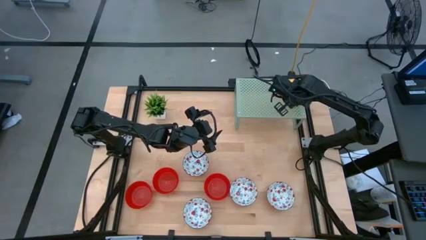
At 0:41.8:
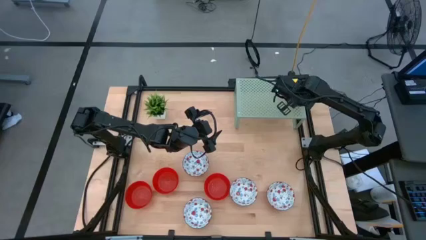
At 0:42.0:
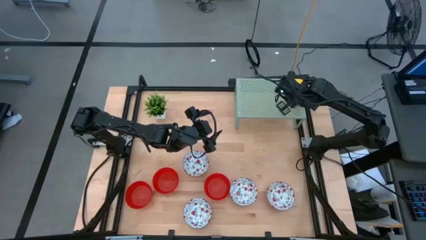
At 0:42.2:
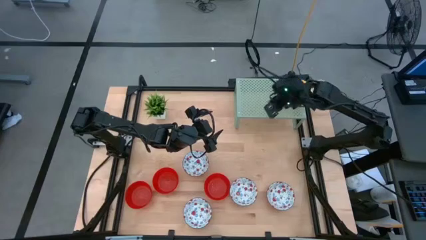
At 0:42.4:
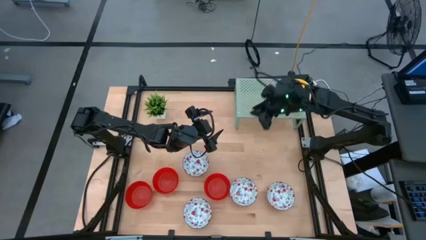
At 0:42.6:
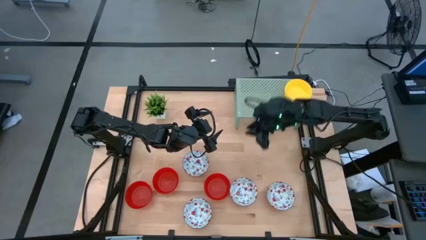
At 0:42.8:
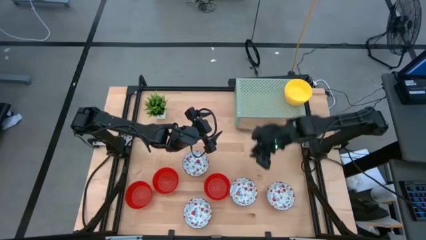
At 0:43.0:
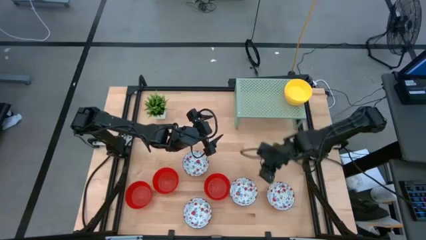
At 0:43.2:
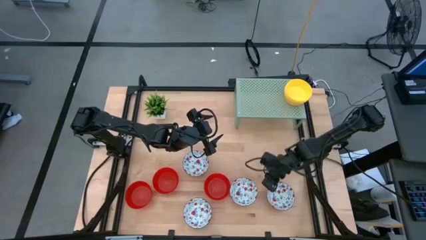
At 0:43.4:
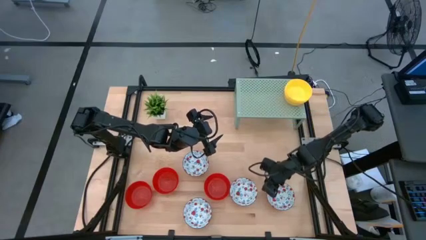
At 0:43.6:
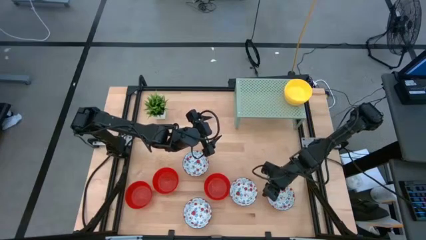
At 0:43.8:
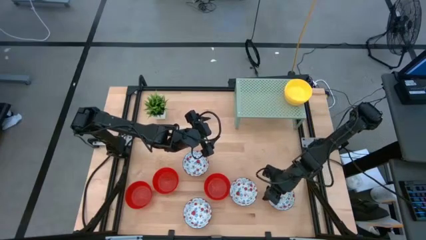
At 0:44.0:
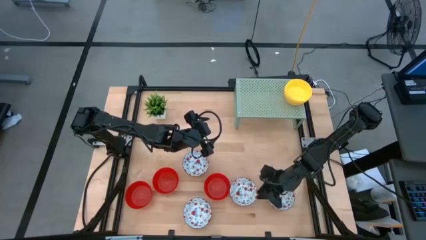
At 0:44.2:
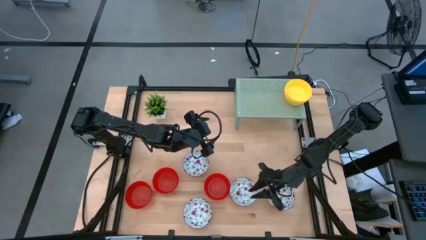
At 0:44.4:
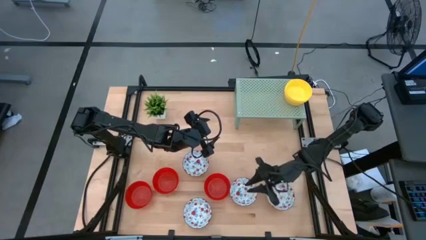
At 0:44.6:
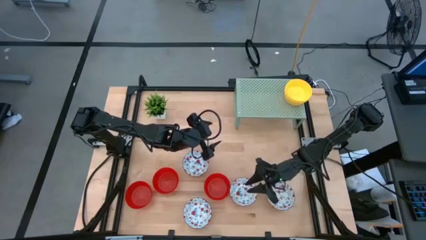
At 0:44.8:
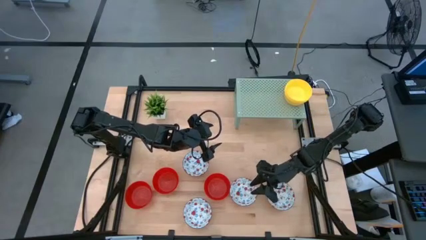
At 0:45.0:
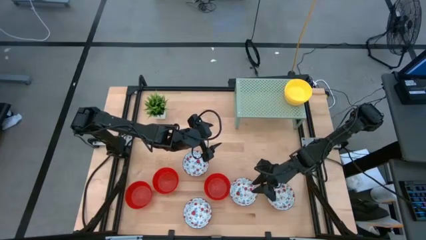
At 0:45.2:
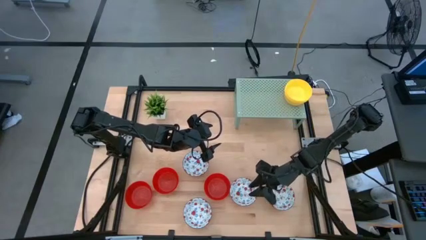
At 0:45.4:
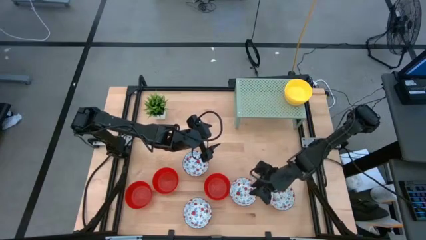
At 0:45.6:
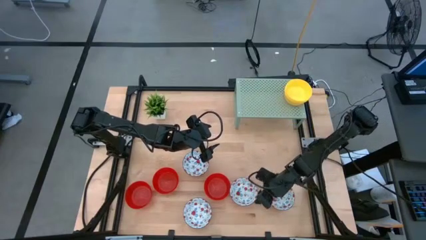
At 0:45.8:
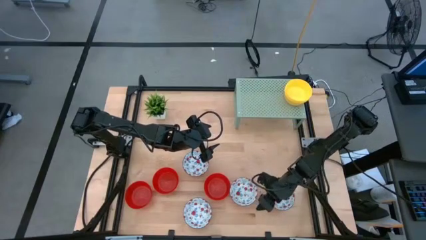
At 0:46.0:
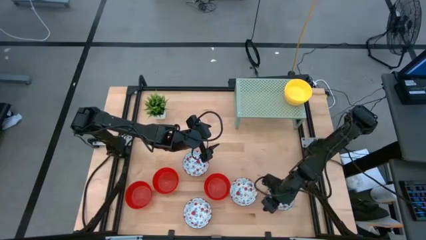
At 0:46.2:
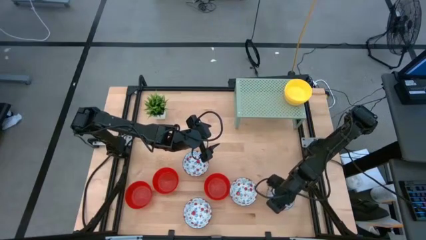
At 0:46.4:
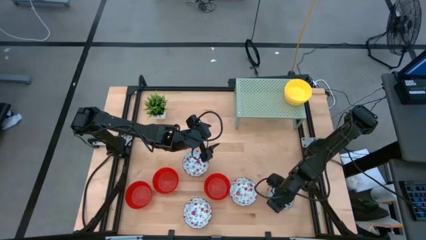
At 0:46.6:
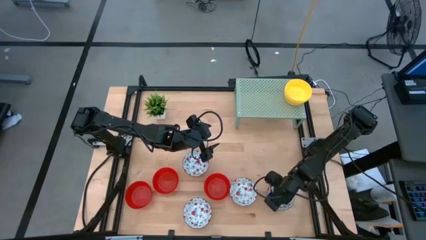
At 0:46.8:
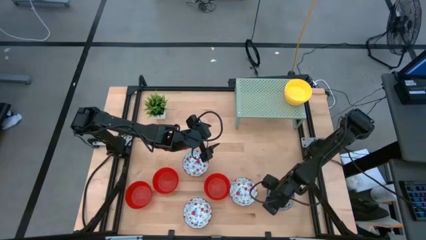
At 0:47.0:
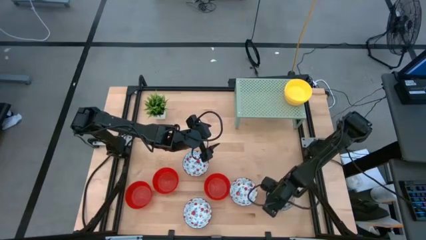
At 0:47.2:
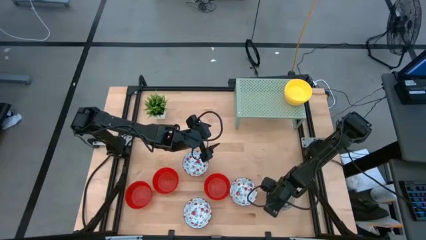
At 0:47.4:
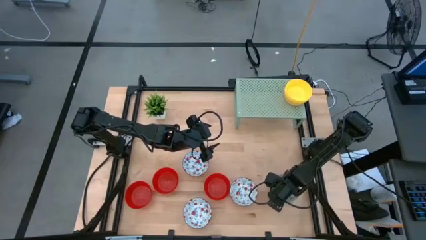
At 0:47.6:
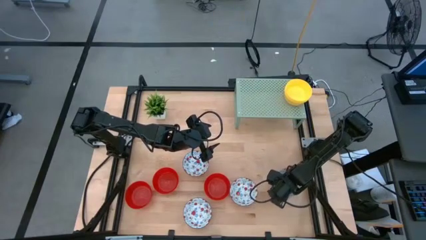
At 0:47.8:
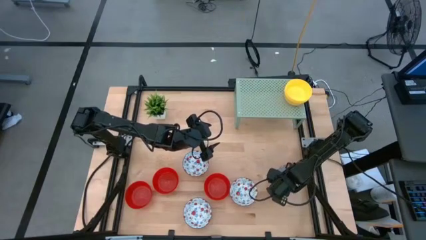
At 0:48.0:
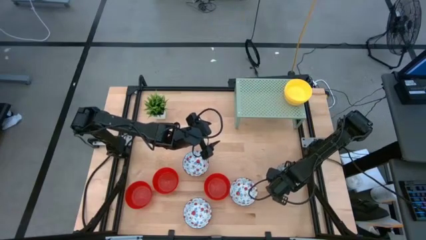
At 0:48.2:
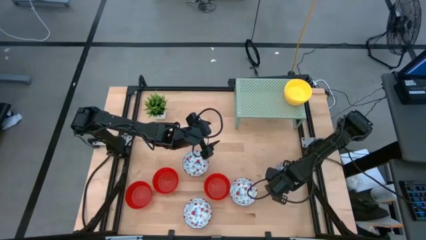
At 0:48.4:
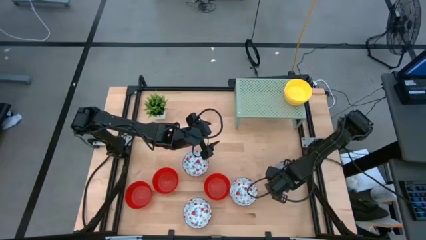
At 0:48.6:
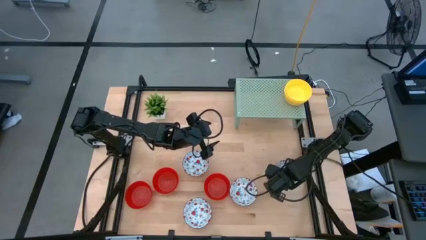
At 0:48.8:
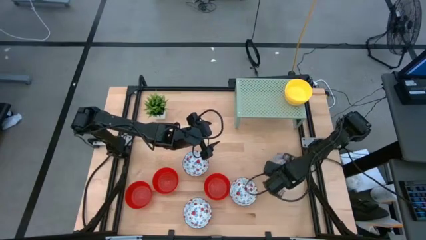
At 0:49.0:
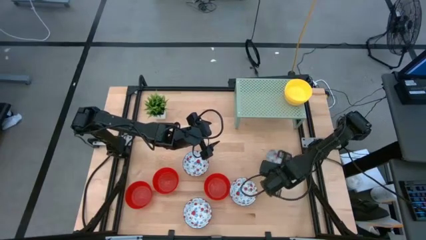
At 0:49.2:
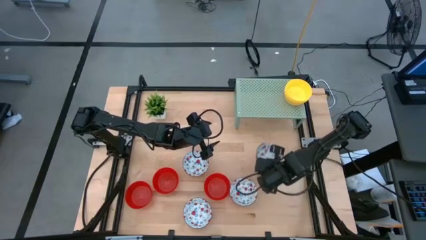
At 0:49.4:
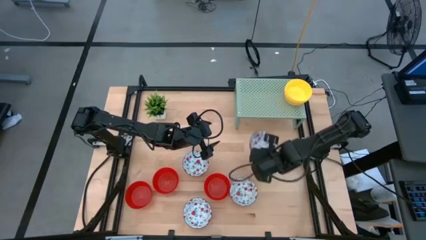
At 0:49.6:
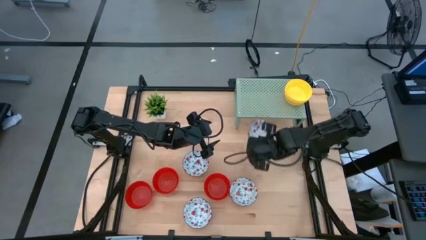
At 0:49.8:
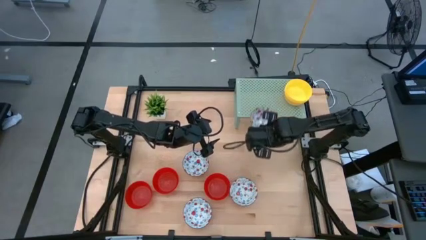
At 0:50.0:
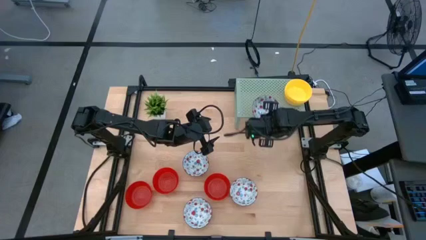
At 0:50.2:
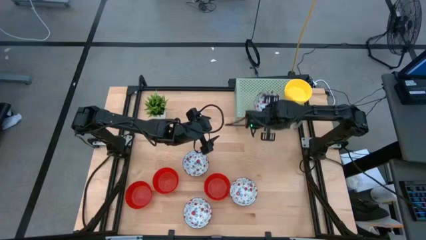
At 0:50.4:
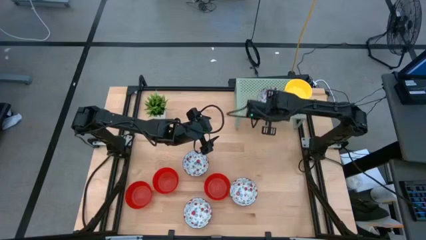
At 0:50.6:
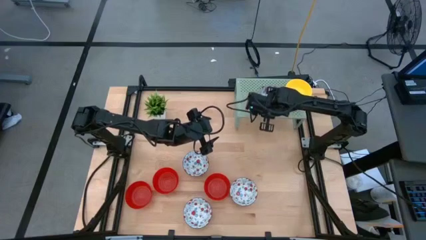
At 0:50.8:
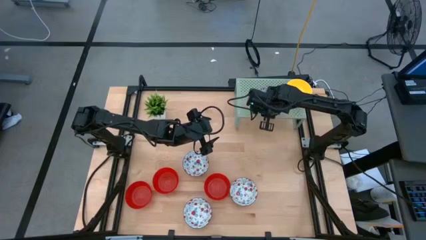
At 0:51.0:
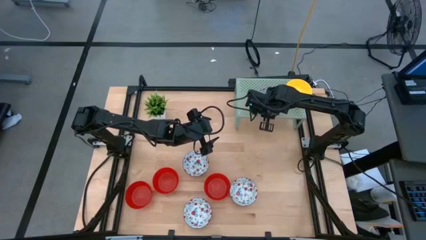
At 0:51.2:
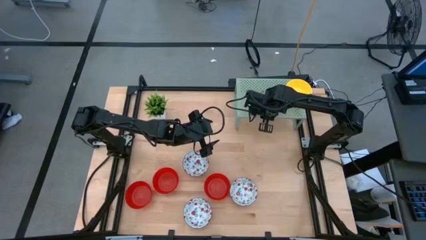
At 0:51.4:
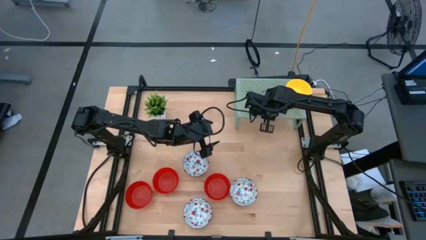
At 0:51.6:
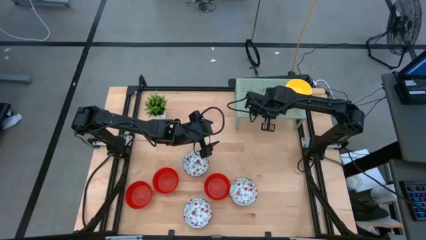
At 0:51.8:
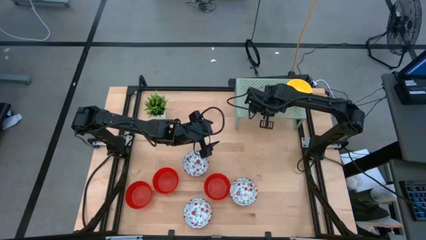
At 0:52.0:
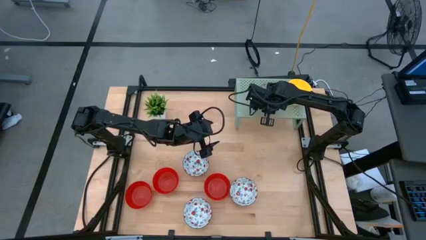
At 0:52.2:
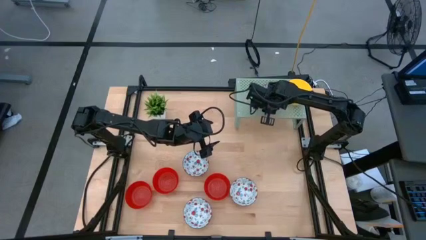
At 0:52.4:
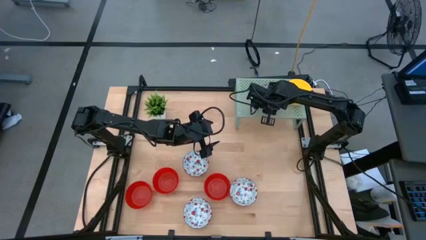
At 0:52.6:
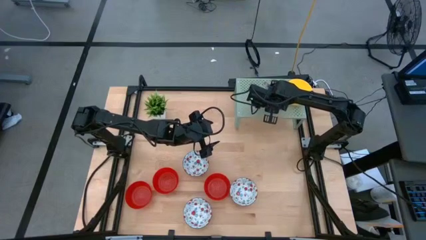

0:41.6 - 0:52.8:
Task: Pick & Place Mini bowls
Put the white pattern bowl on the shelf

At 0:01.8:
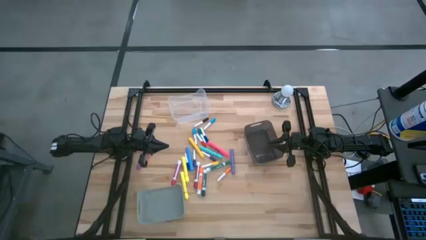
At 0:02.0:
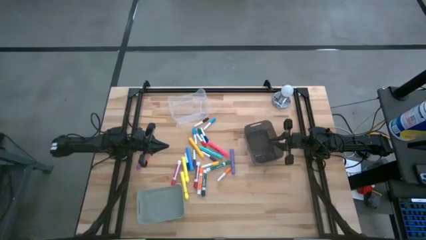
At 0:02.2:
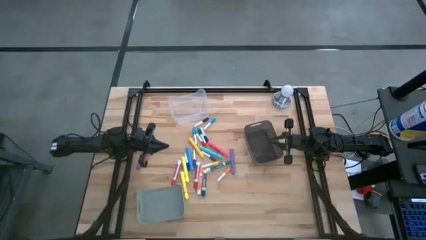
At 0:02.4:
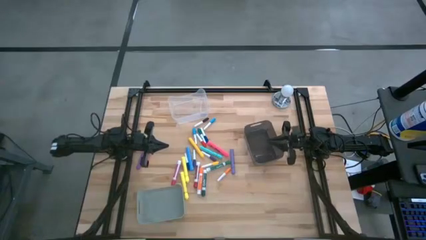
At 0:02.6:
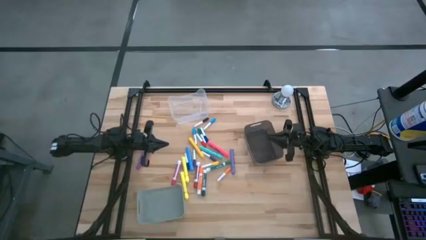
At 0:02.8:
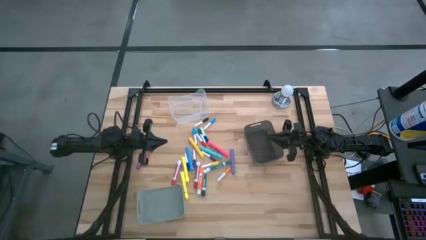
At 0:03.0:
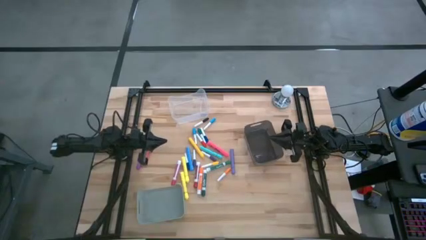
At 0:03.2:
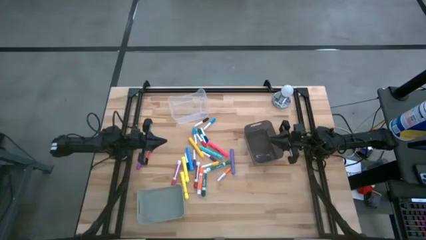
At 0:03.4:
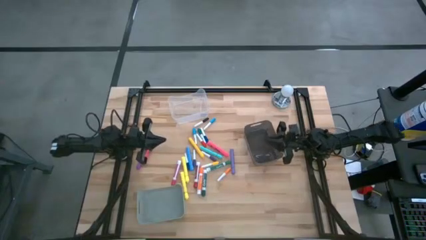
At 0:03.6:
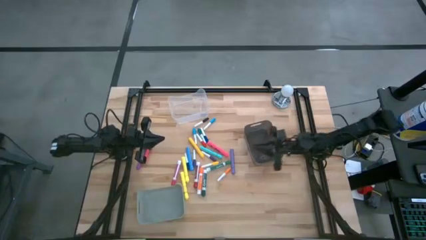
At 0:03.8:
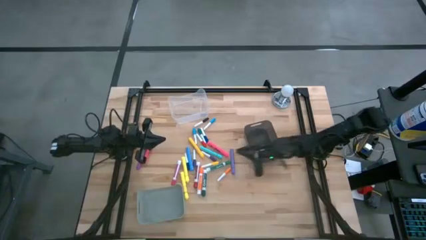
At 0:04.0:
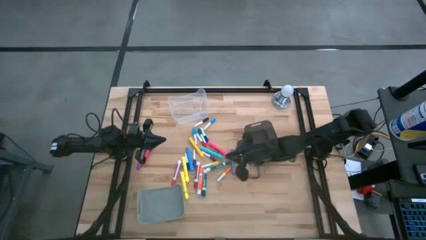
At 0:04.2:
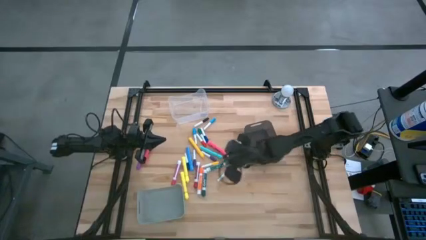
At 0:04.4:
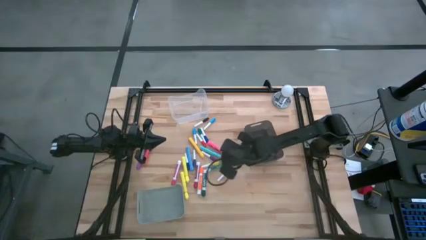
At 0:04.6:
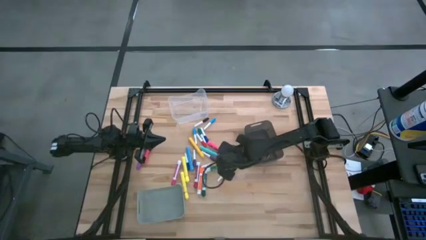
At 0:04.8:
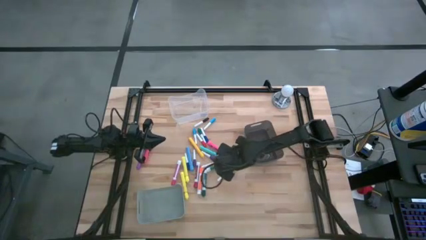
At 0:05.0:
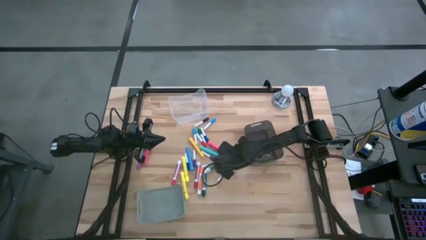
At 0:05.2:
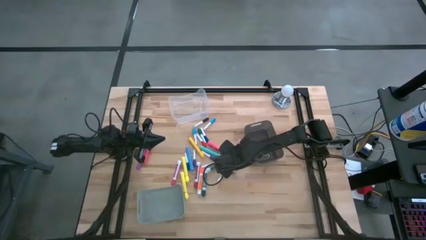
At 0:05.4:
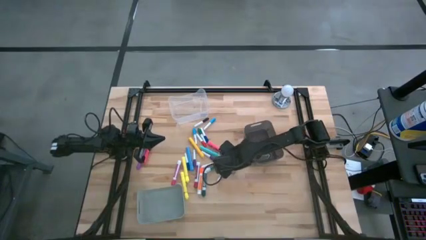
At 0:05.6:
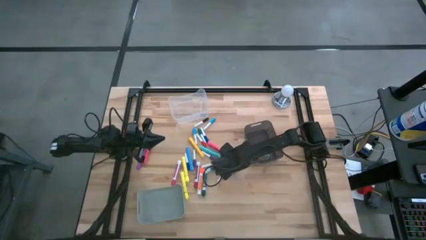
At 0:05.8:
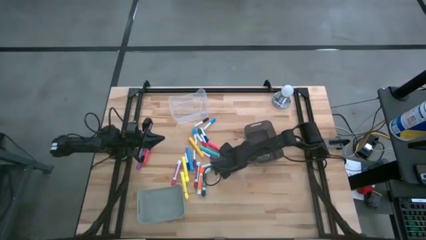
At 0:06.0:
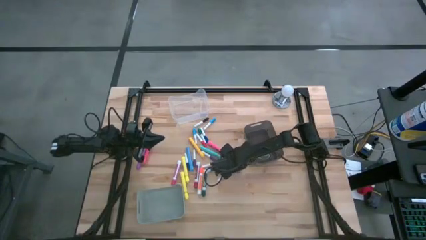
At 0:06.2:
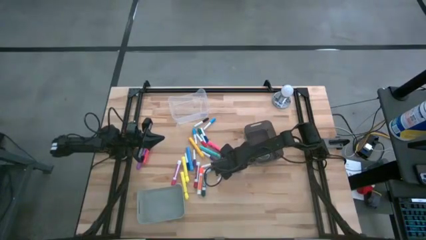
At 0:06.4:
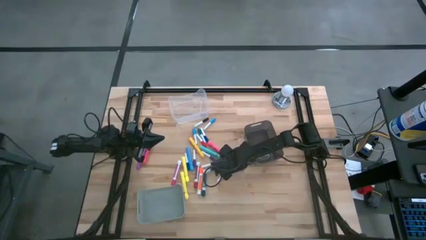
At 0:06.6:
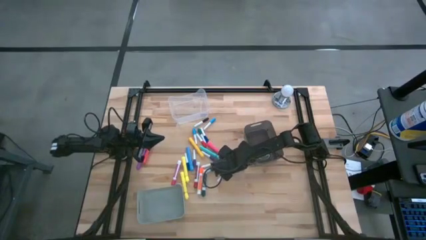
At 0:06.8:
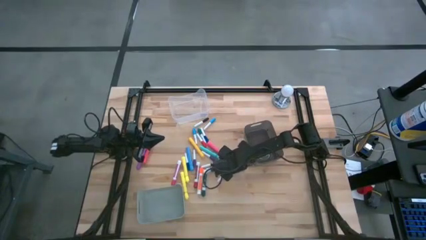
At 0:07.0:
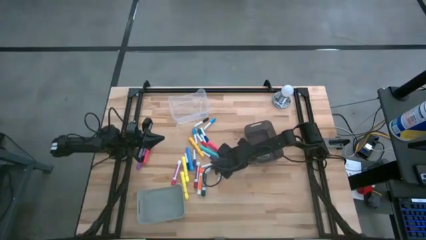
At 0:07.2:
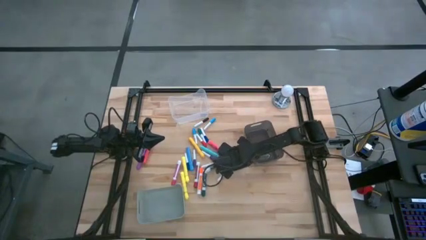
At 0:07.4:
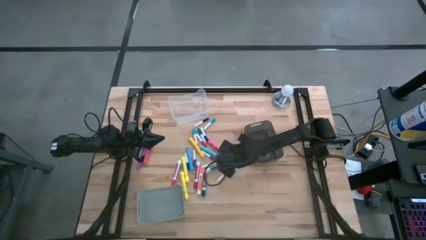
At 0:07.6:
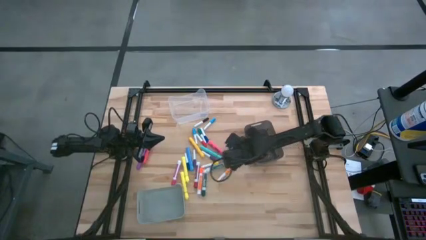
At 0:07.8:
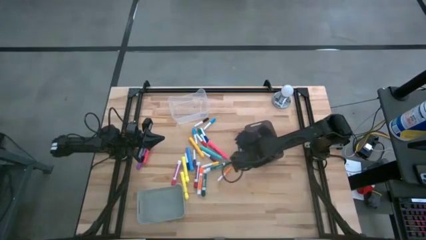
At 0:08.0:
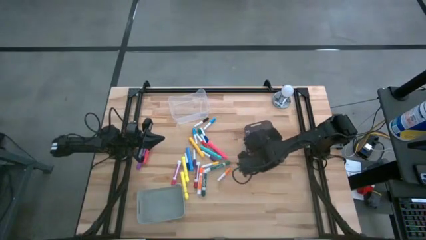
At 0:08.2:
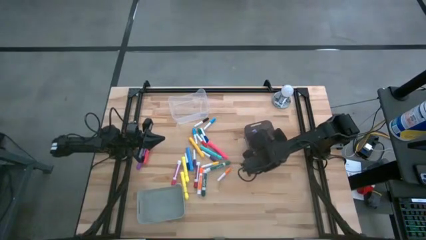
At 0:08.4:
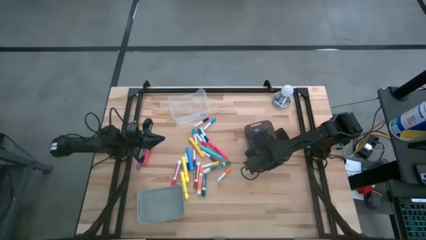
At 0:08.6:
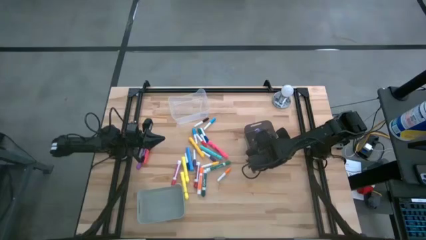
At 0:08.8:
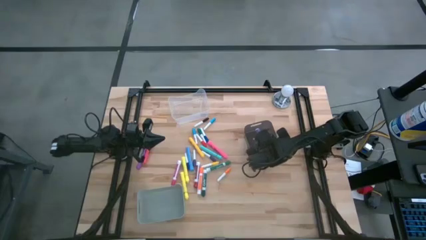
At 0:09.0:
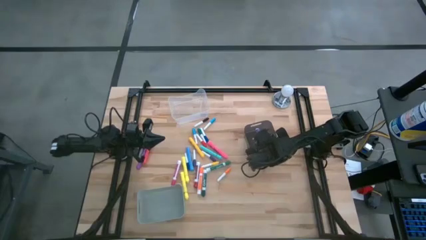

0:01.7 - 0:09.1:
Task: Pick & Place Markers
Put the violet highlighter pen into the black bin
